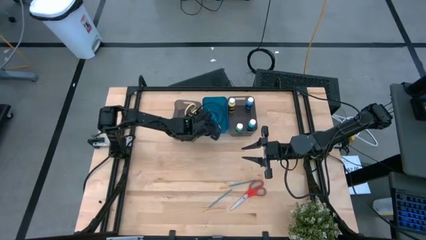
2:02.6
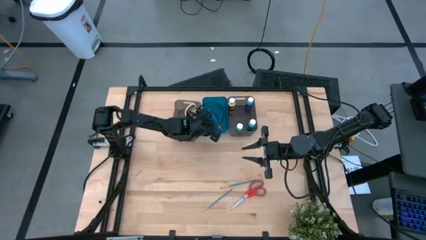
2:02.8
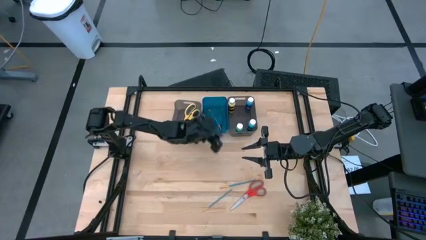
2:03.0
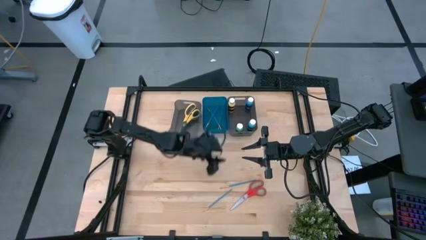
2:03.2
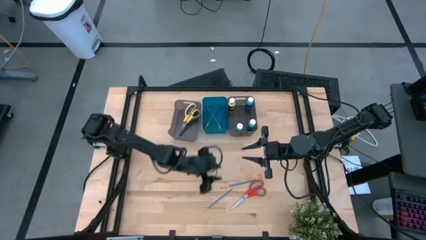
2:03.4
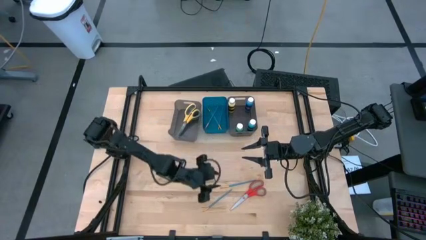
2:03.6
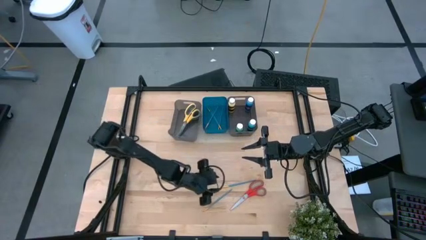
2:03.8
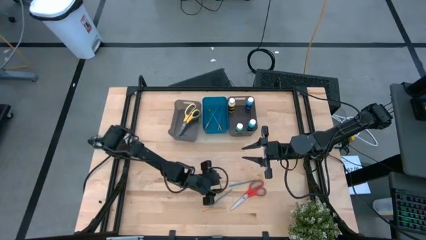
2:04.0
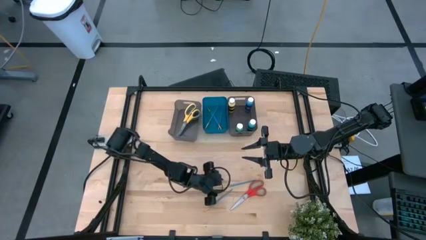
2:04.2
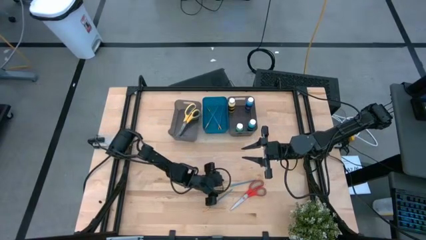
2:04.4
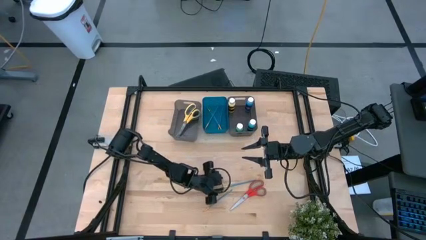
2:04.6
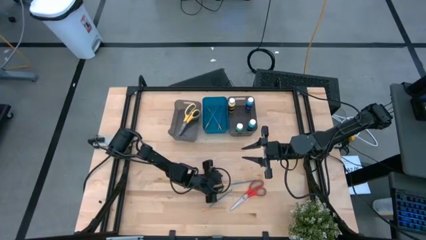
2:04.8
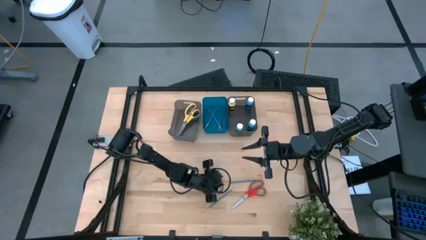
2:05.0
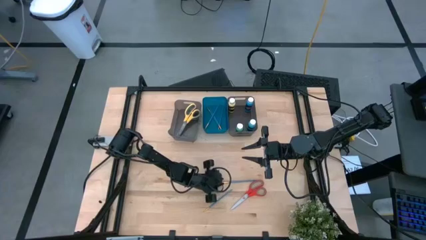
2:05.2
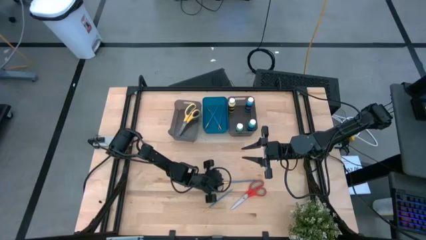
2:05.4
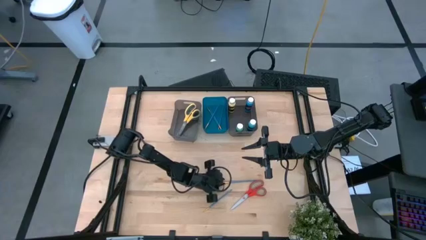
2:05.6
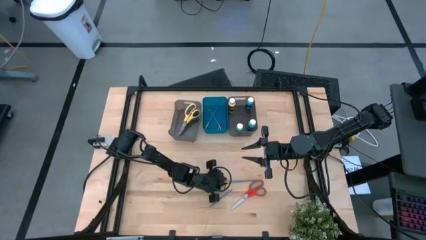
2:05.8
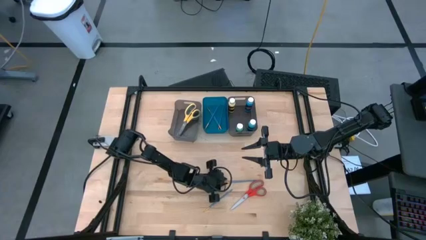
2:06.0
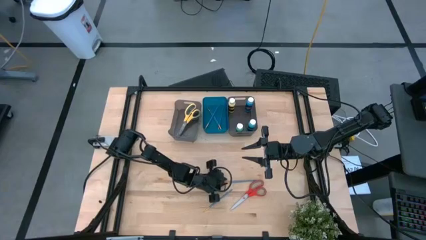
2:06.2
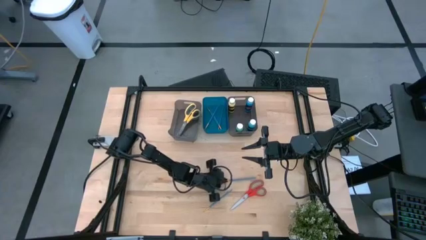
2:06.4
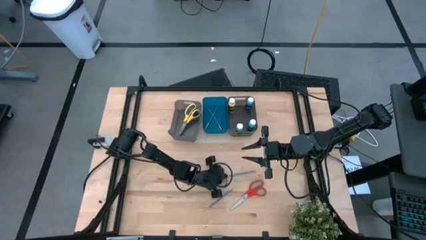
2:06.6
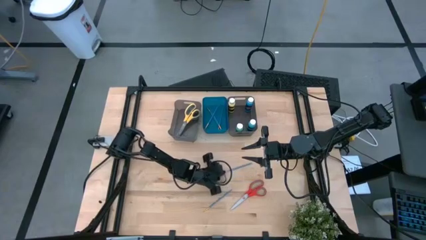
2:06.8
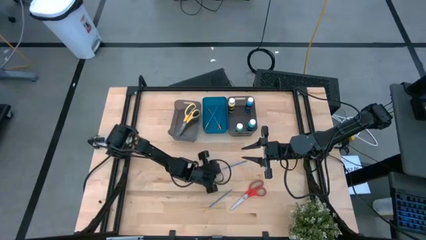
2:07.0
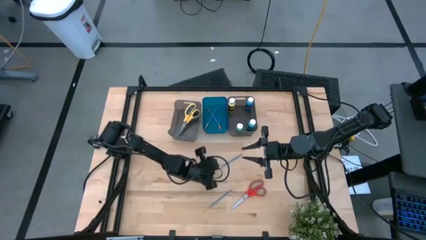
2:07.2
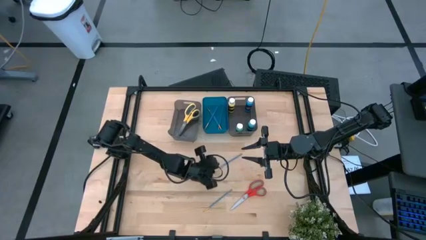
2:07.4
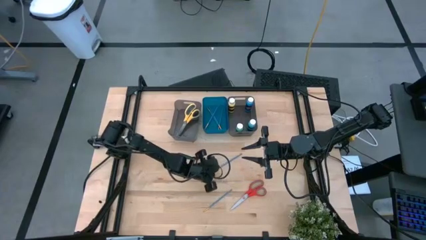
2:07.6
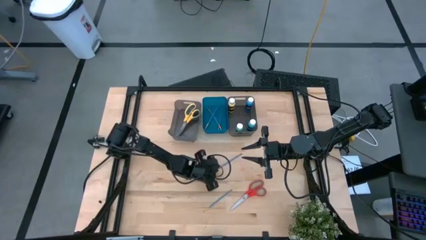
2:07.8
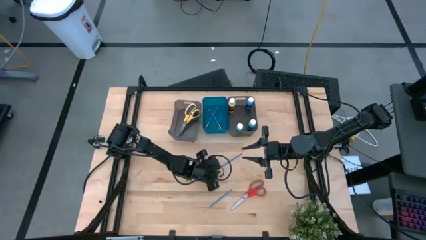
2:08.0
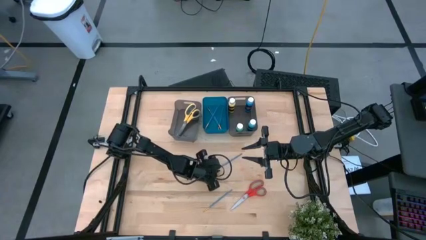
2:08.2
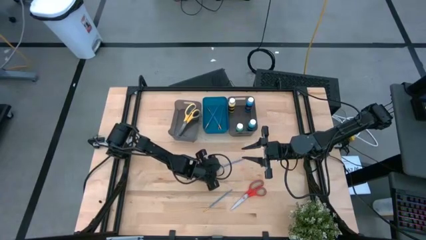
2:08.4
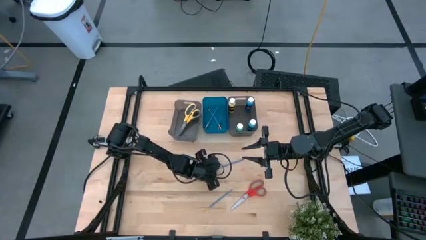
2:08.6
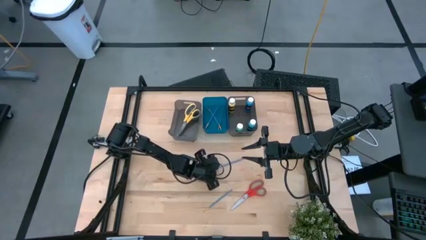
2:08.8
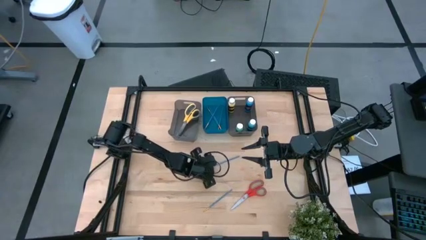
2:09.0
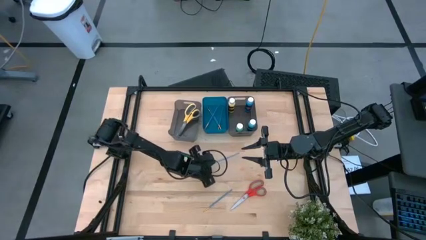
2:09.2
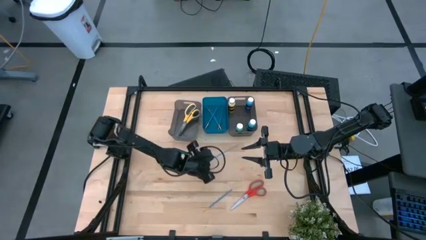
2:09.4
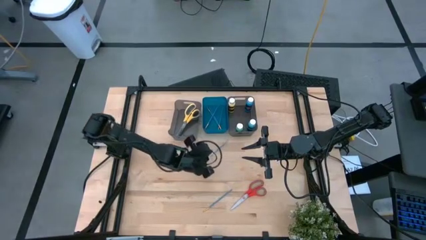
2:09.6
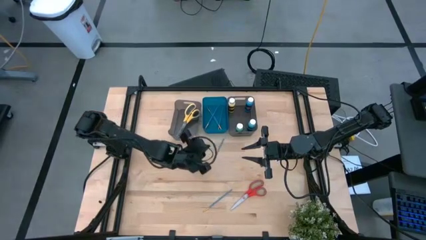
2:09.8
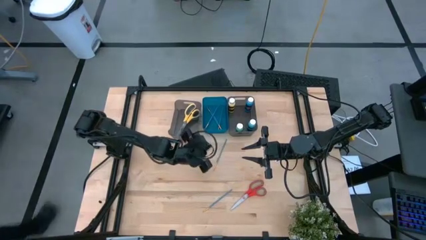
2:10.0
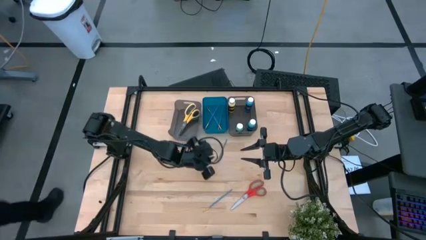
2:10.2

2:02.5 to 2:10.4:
Task: Pick & Place Paint Supplies
Put the blue paint brush into the blue bin

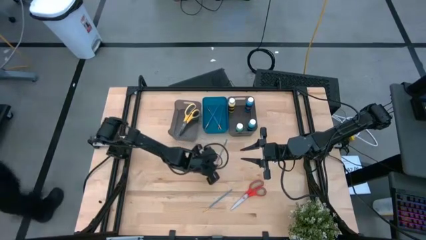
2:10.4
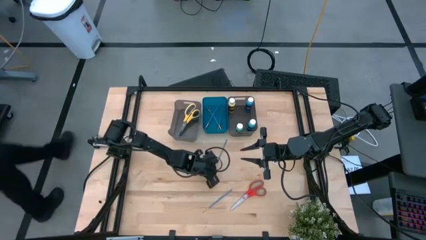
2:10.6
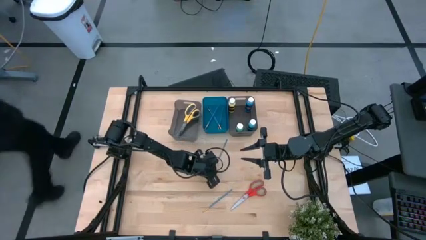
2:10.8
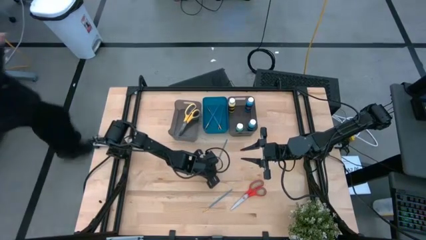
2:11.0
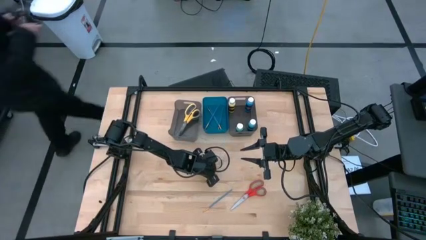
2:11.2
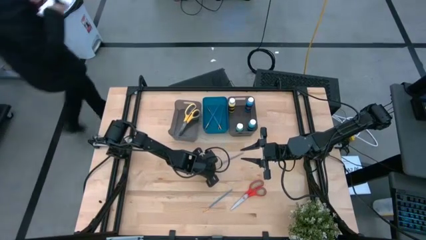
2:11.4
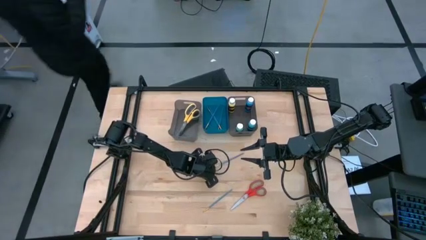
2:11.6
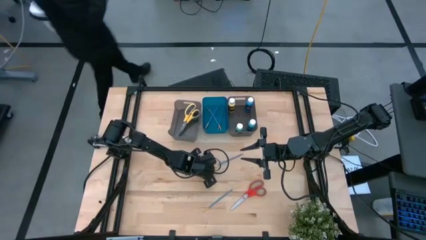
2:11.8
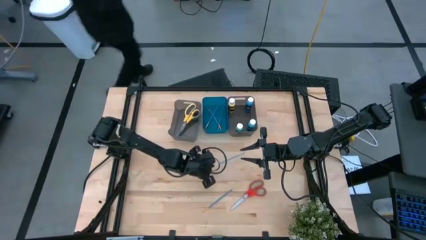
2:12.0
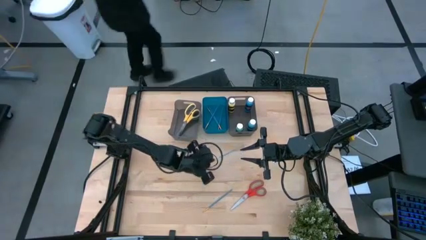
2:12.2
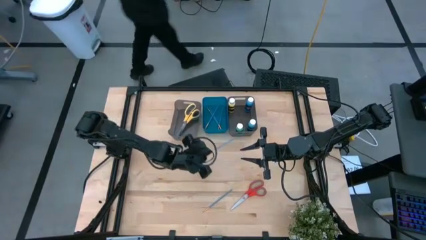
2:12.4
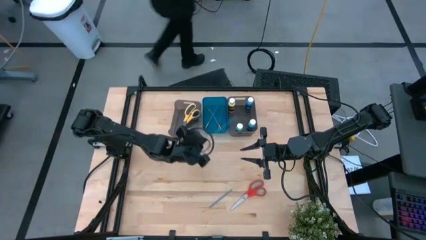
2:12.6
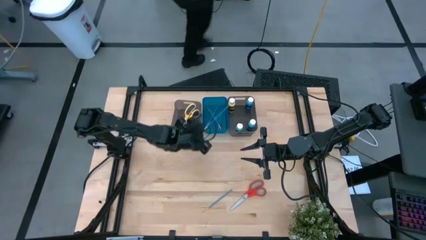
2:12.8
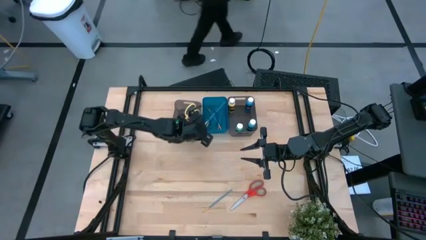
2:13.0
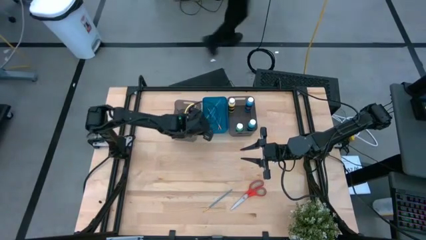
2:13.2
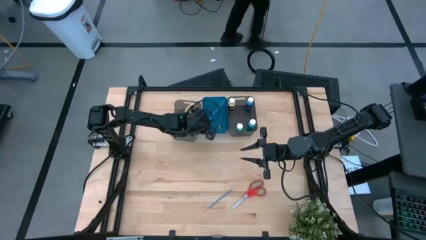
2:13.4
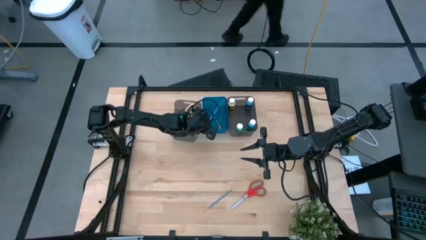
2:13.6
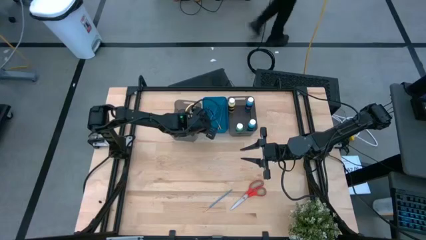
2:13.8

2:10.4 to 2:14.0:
Put the blue paint brush into the blue bin

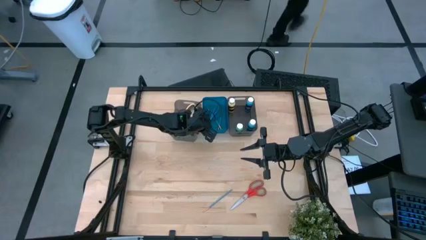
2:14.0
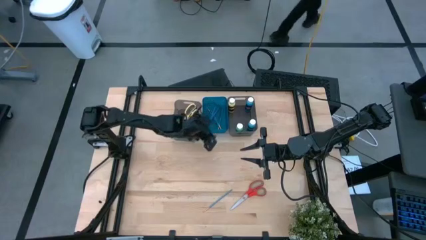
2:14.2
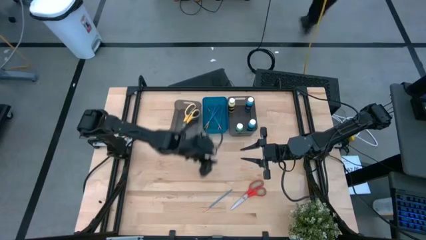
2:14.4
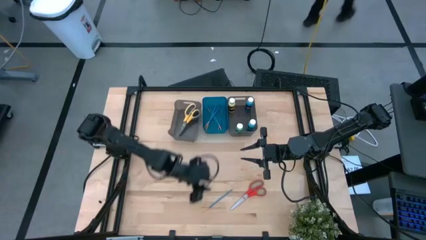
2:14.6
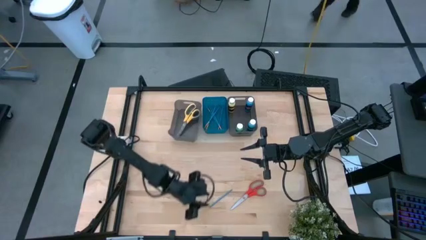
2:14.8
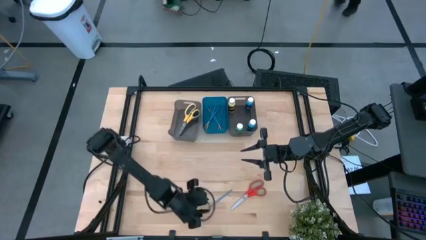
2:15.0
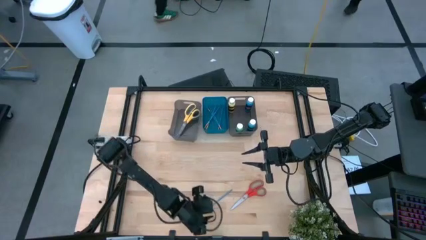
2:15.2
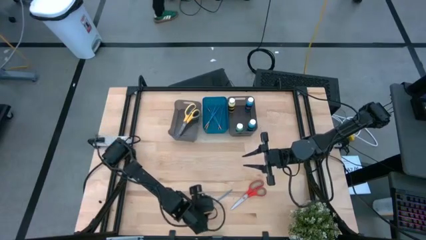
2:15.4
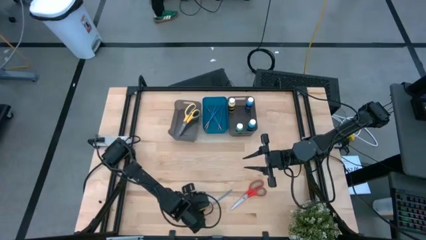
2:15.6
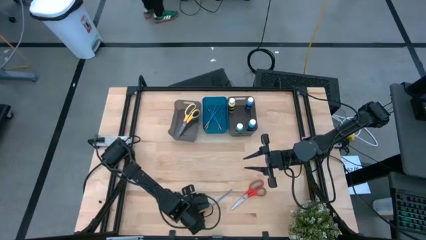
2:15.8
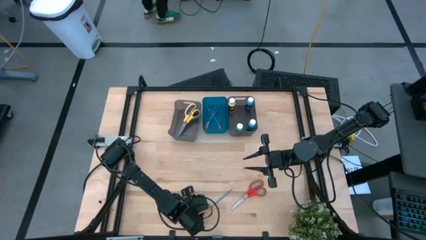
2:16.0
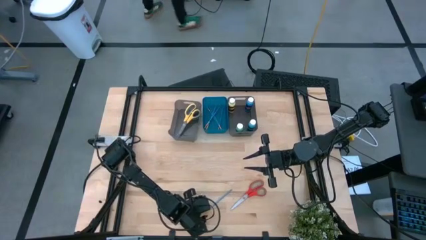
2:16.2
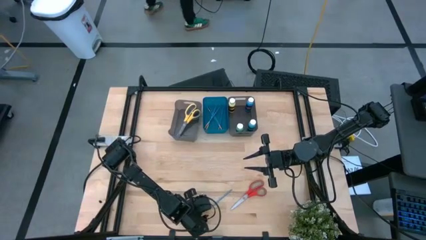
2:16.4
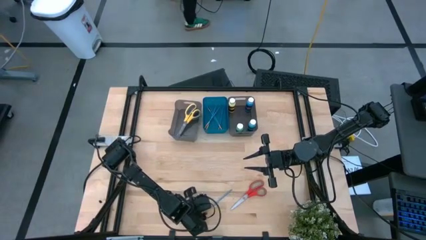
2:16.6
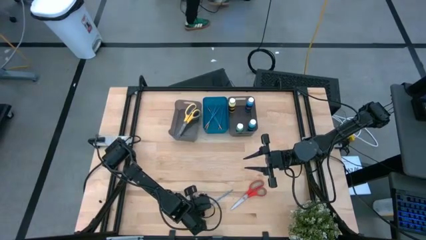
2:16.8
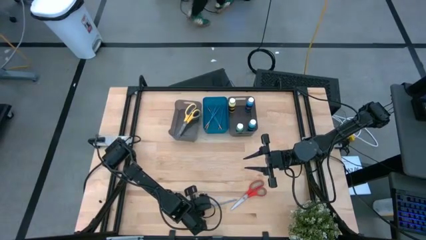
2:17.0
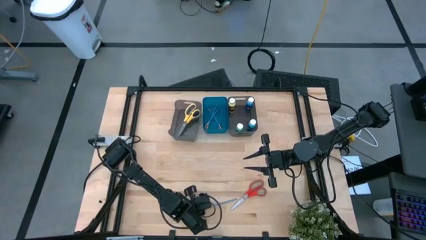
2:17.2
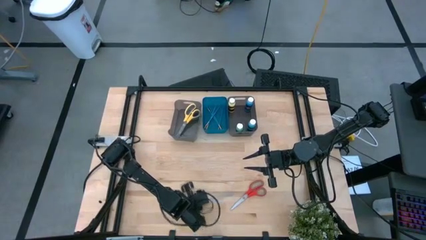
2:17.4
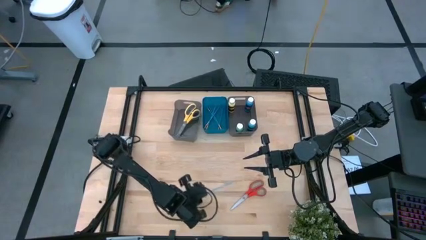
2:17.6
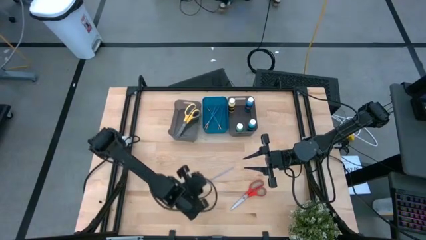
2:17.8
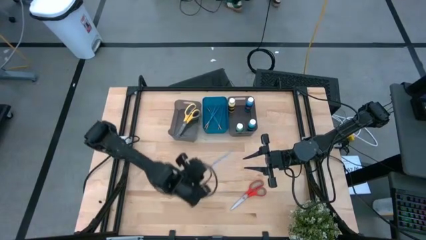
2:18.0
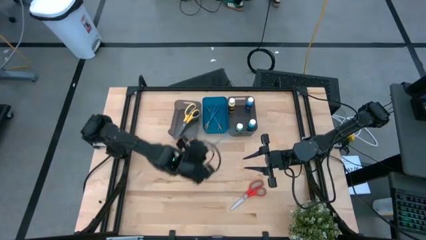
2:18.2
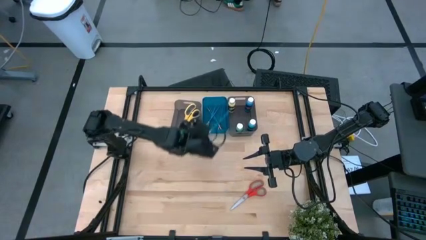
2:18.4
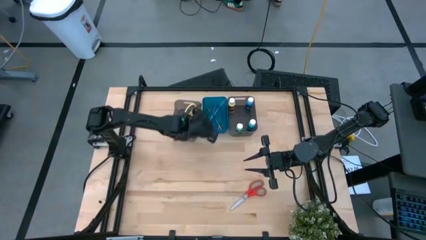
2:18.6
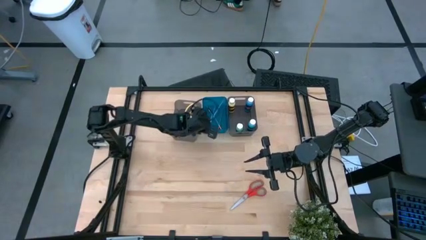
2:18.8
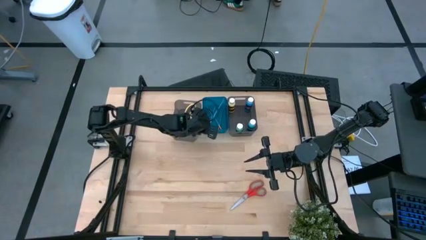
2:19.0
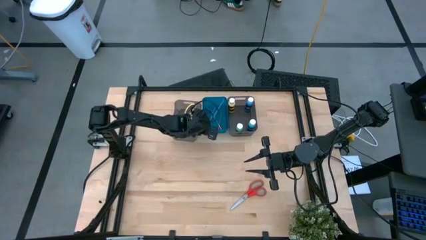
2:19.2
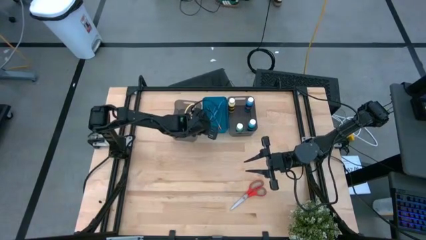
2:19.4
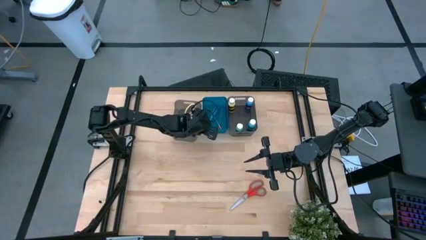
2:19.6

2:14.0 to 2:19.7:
Put the blue paint brush into the blue bin

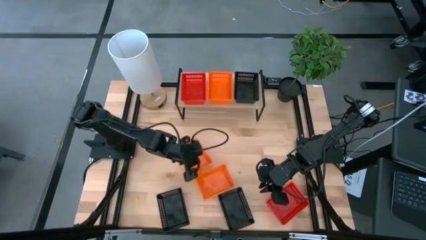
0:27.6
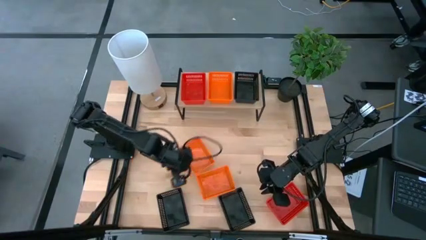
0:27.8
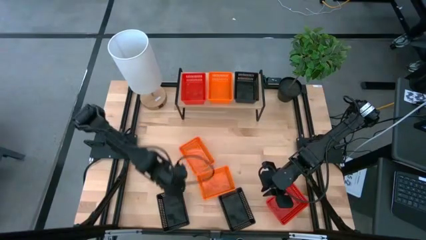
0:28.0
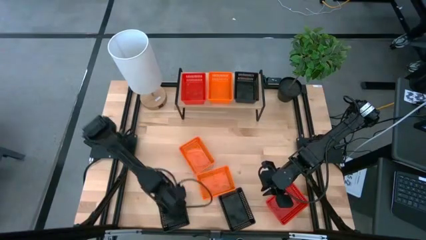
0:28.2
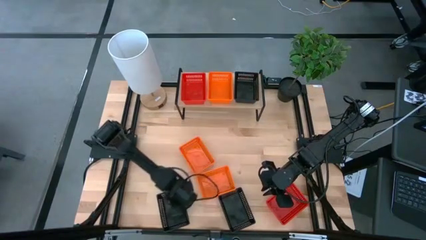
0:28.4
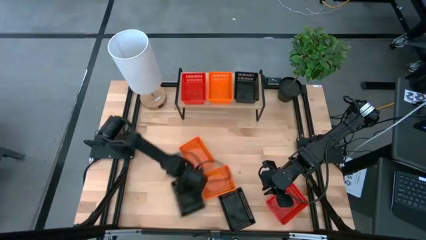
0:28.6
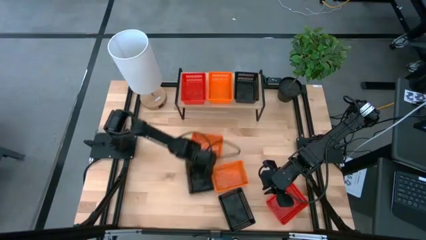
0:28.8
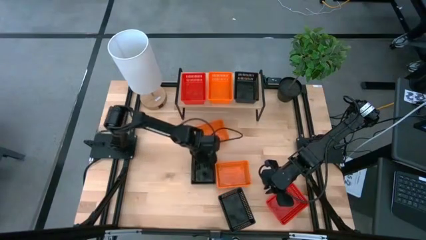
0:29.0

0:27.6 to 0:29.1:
Task: Stack baskets on shelf by color
Move the left black basket to the center of the table
